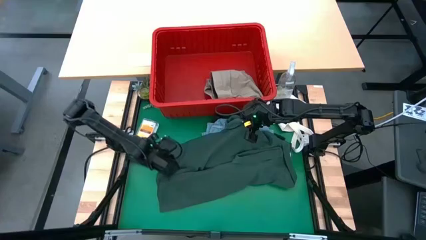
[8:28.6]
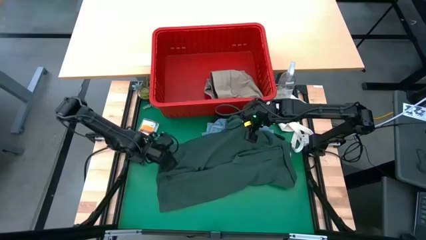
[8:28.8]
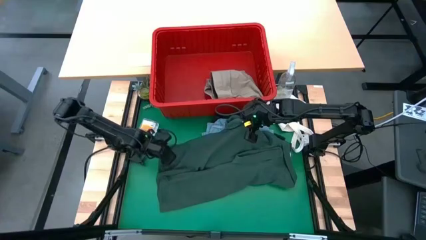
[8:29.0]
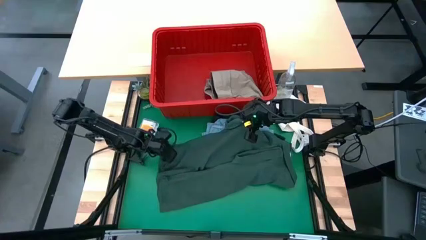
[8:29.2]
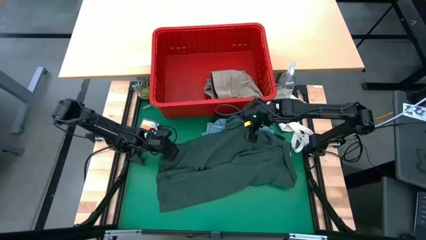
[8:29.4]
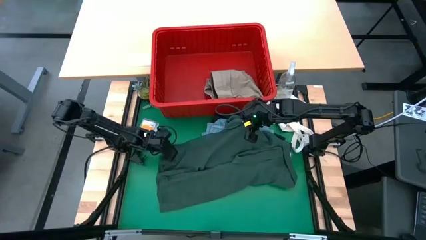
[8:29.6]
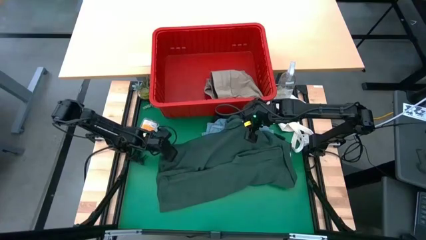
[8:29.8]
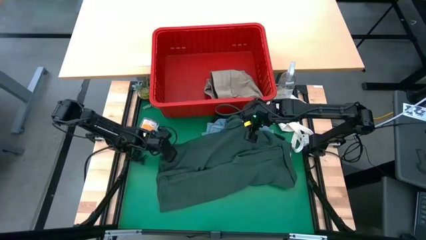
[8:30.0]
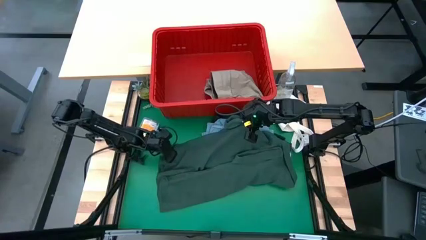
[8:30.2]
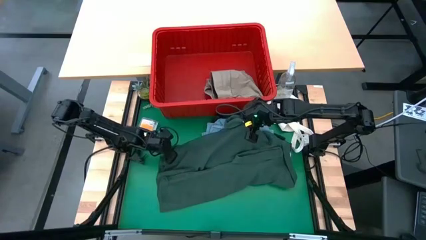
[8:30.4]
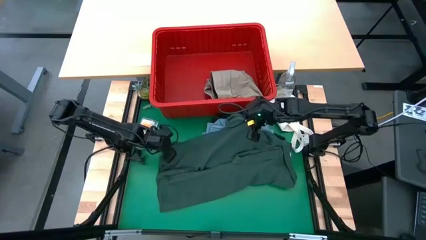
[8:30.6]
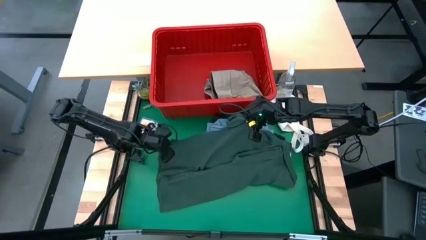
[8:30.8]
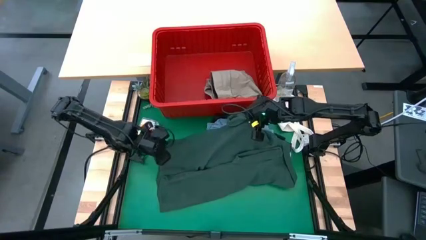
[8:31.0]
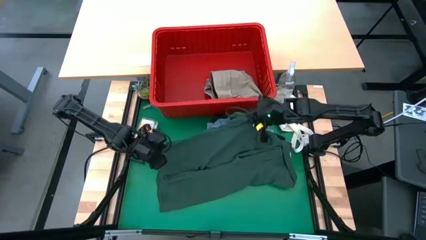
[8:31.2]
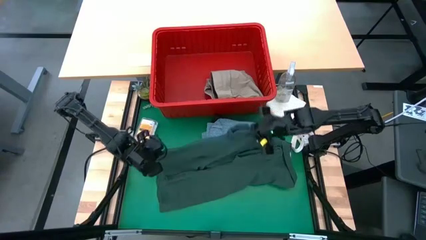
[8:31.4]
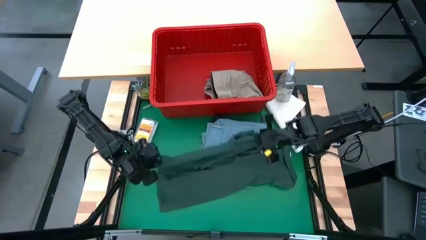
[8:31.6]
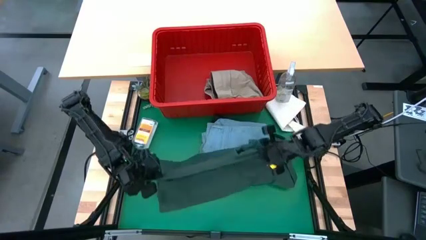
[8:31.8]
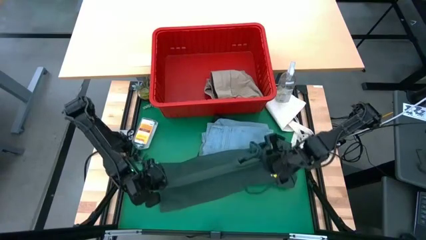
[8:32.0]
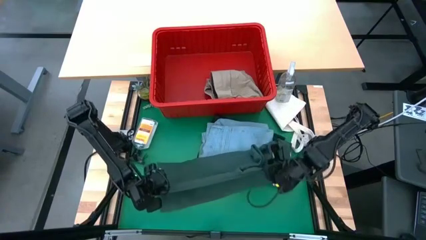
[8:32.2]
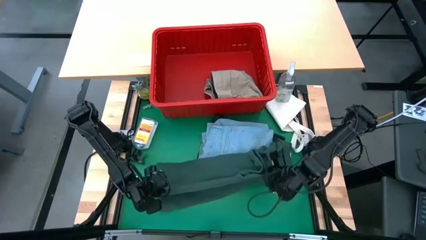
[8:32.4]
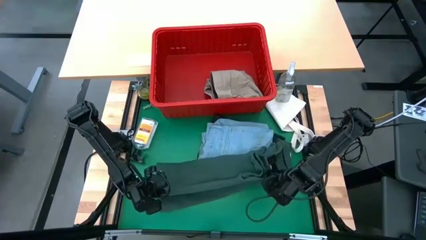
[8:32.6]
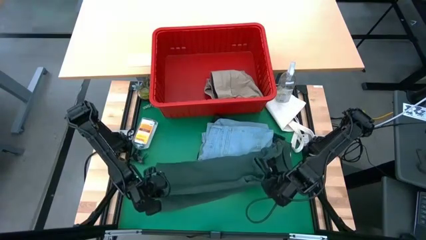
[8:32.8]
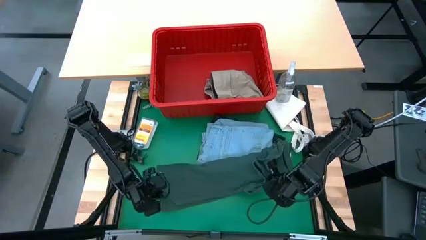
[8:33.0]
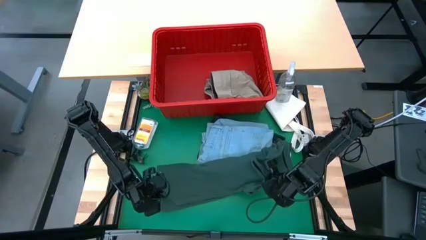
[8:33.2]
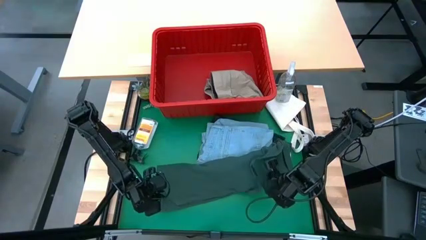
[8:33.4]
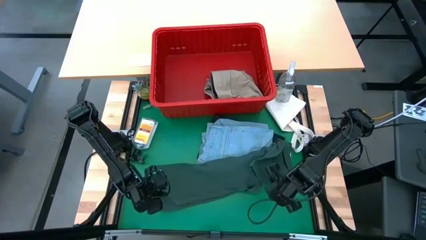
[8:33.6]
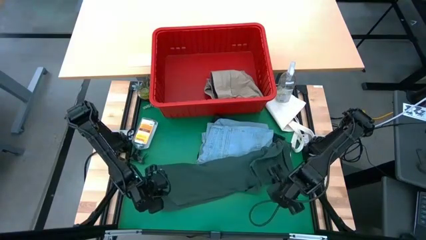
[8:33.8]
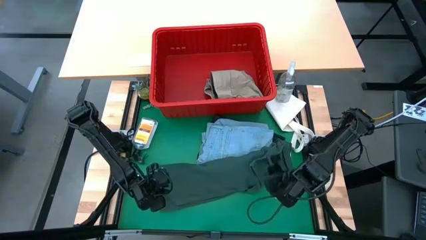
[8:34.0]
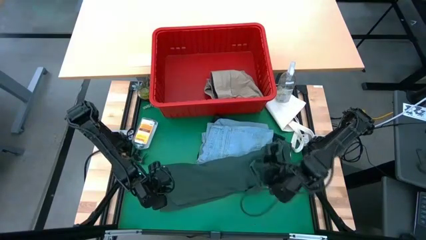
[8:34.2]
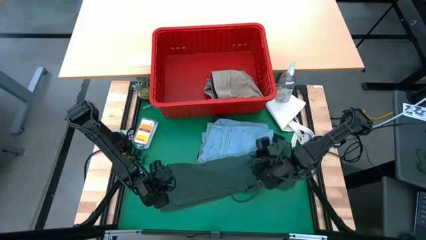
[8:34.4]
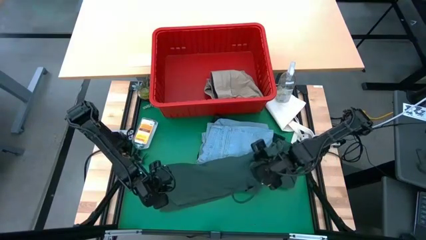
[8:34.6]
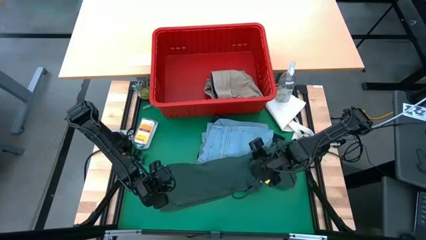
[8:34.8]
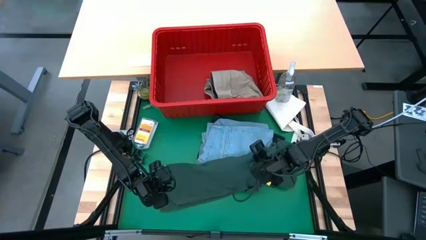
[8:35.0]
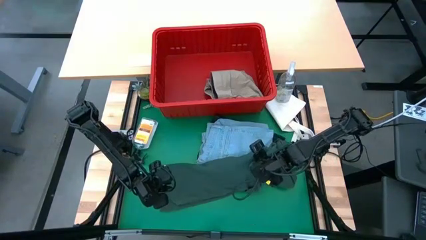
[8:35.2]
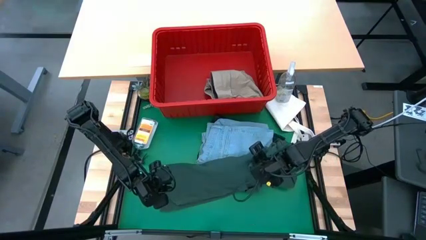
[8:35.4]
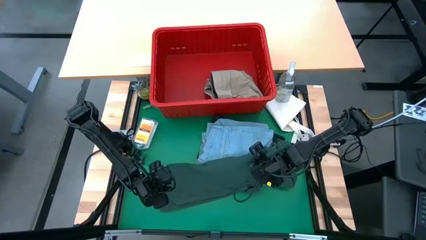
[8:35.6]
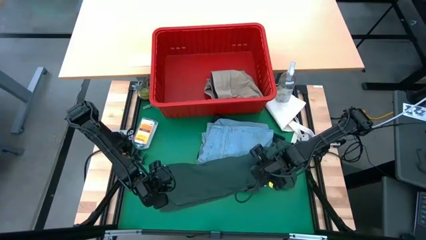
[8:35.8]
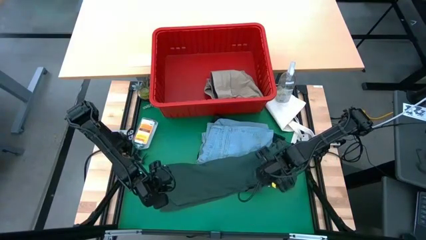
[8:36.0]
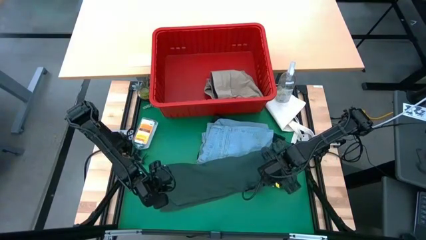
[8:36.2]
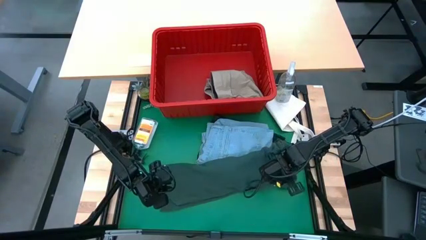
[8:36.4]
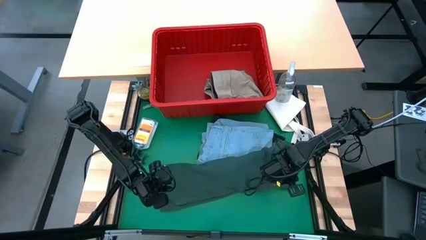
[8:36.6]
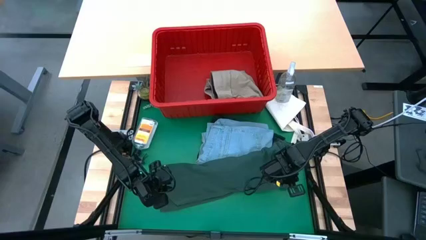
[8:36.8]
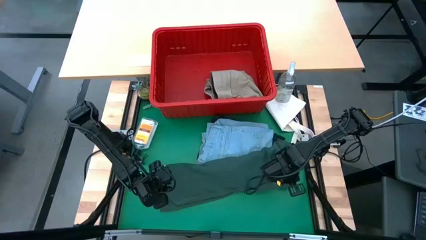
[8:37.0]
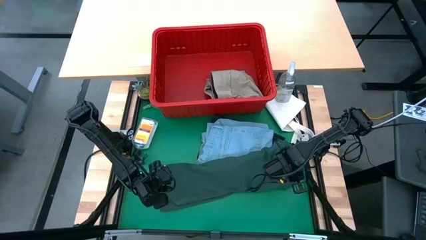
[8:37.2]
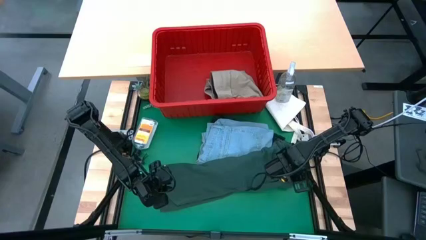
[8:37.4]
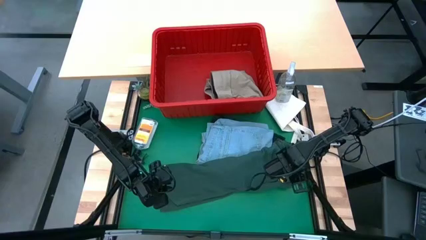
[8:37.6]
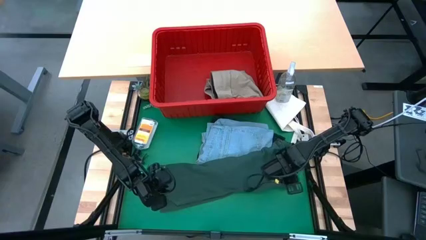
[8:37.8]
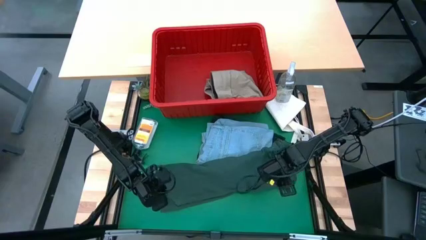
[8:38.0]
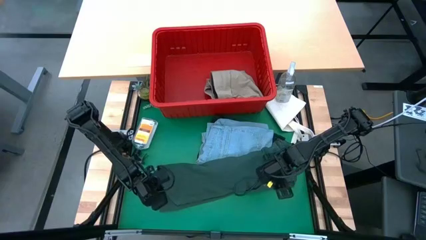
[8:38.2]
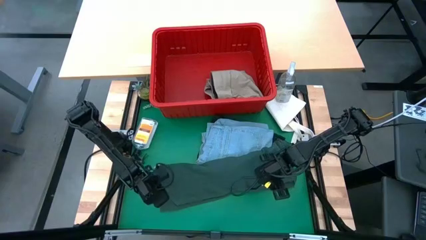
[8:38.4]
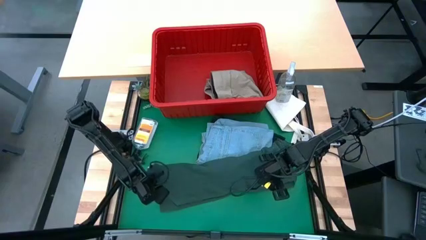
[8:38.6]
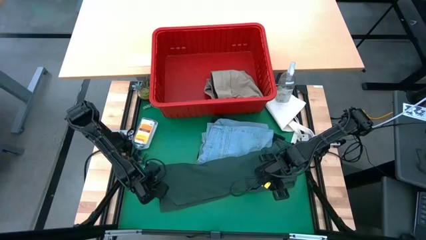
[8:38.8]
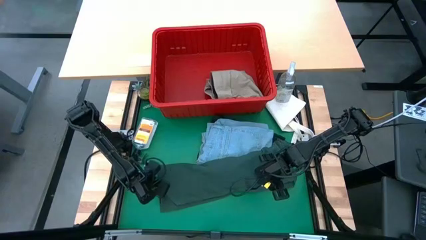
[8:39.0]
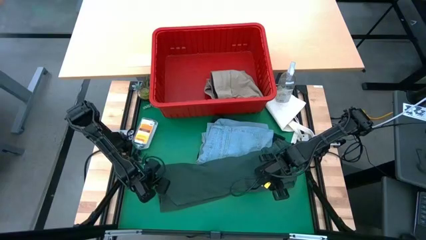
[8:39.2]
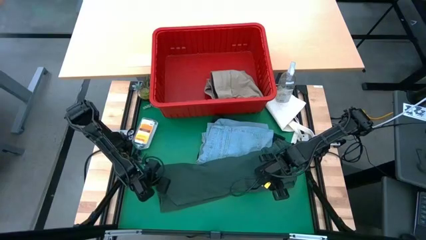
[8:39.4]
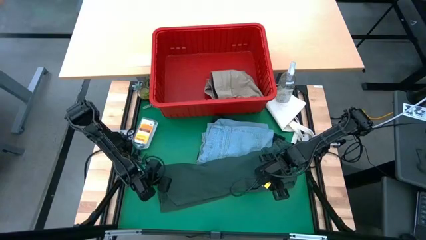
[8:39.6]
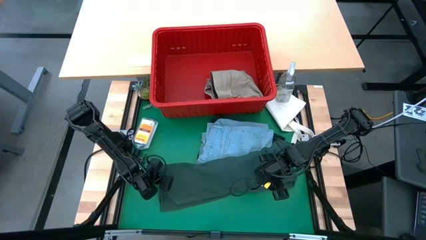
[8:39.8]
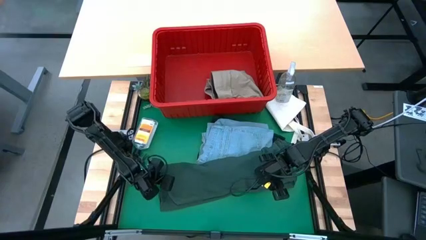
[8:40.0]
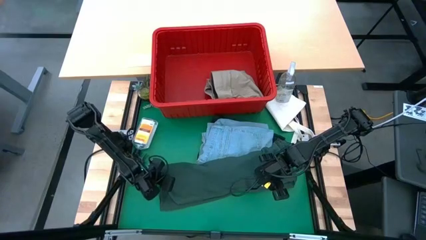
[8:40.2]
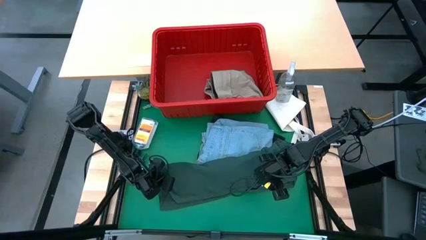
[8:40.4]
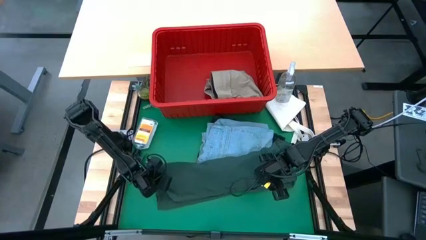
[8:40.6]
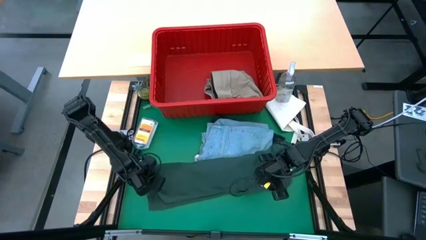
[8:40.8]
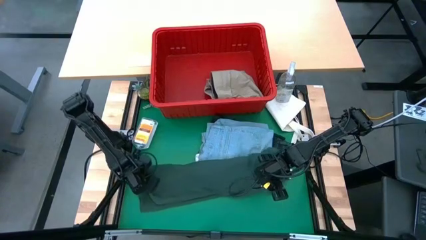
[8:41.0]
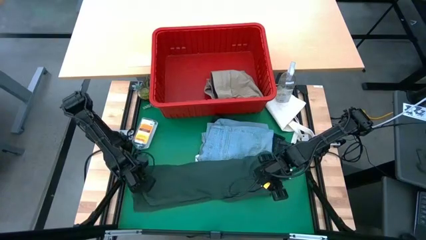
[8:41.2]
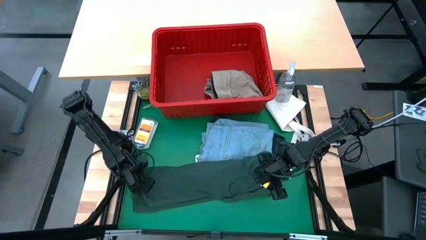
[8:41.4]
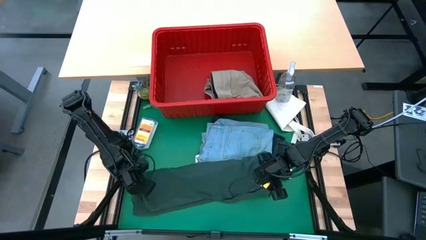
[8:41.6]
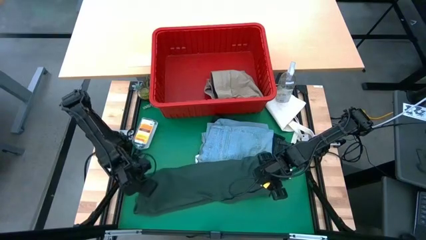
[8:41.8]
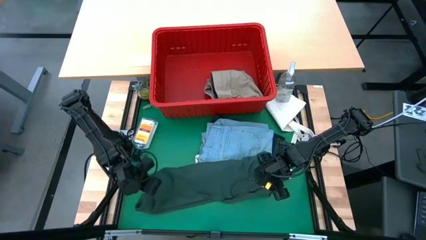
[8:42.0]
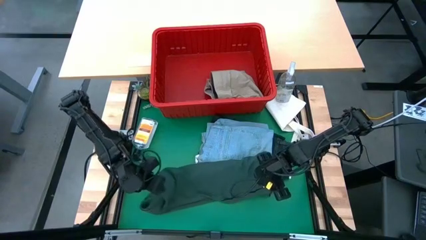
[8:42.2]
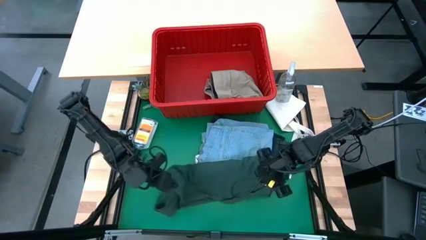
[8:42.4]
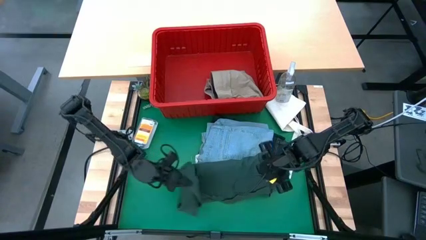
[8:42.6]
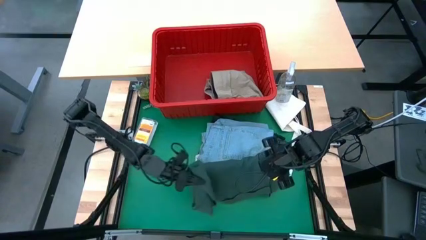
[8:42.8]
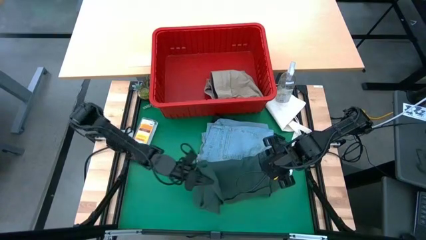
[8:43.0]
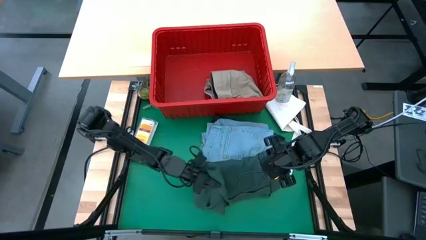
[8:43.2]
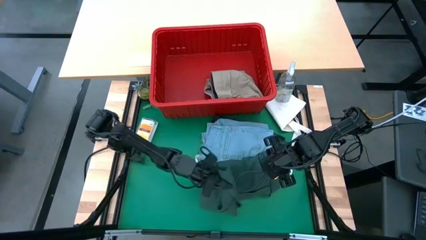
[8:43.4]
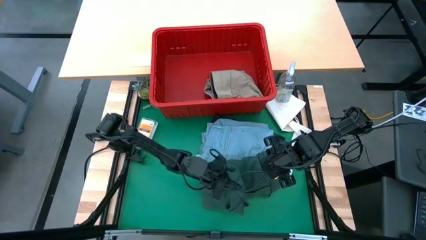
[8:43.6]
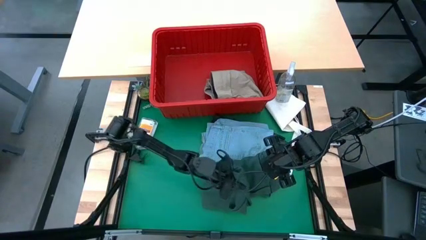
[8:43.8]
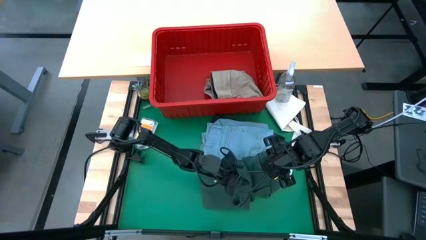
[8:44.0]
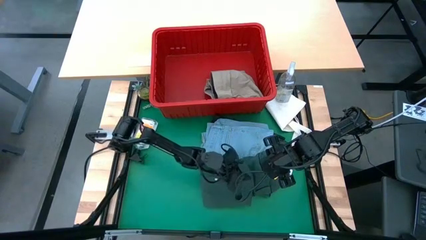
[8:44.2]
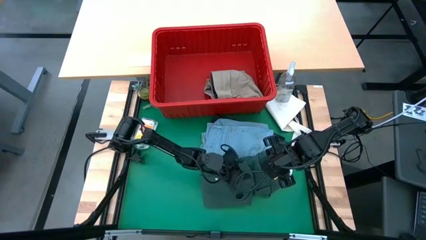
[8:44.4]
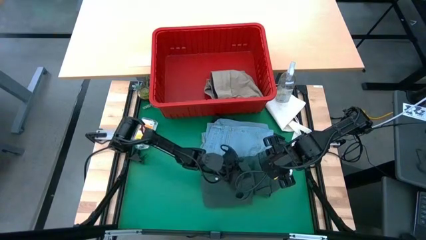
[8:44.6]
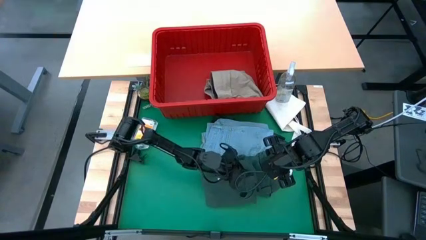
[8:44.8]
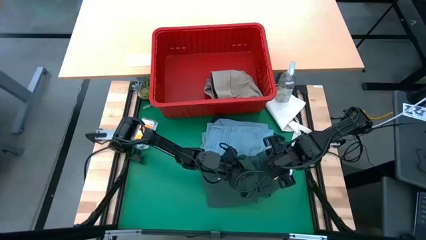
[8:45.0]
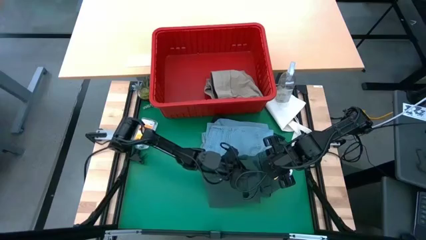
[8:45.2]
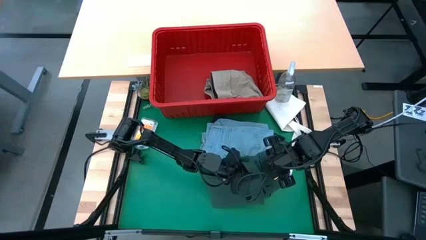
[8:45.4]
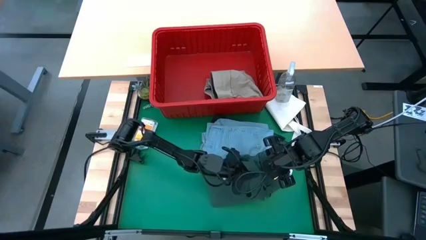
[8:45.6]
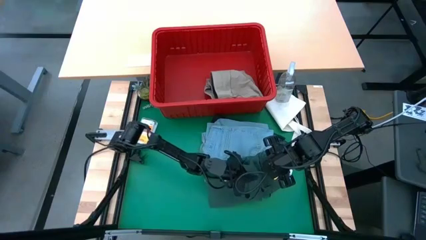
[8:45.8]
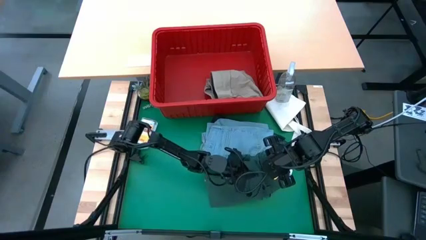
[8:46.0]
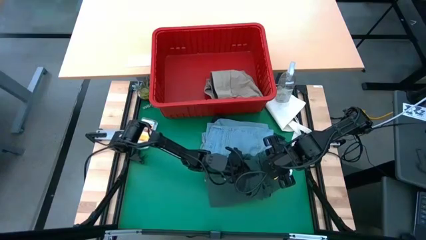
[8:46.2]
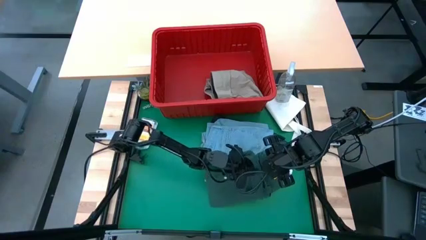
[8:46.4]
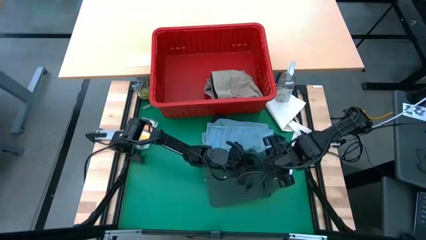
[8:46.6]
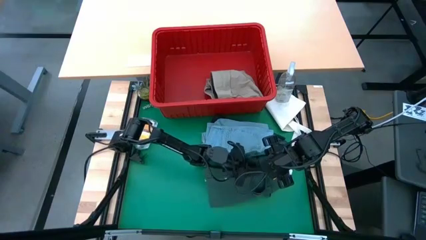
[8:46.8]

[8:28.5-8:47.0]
Task: Fold laundry
Fold the green shirt
